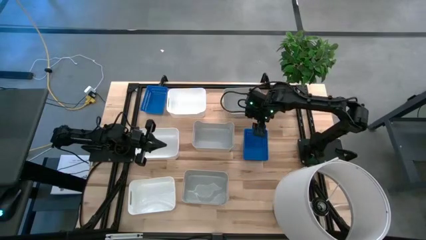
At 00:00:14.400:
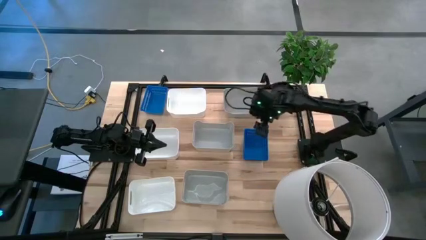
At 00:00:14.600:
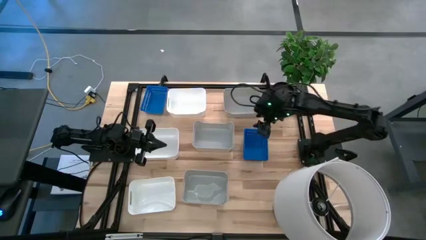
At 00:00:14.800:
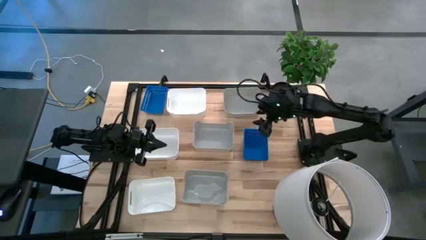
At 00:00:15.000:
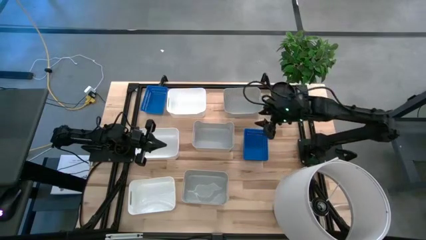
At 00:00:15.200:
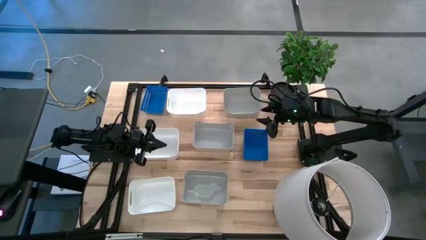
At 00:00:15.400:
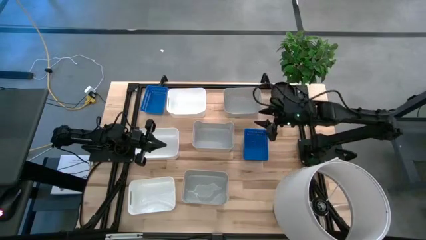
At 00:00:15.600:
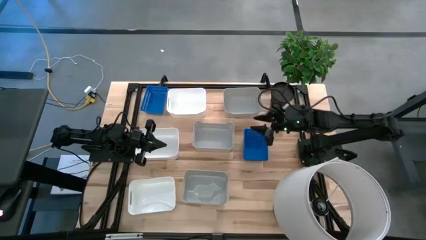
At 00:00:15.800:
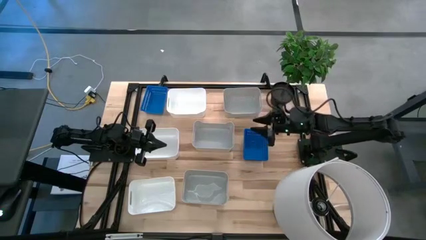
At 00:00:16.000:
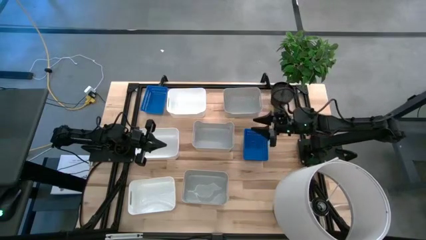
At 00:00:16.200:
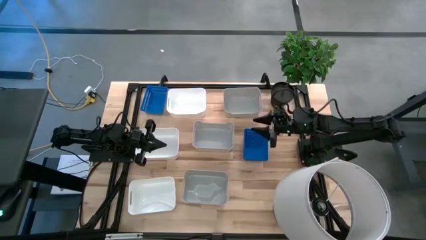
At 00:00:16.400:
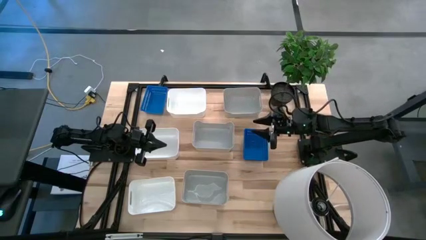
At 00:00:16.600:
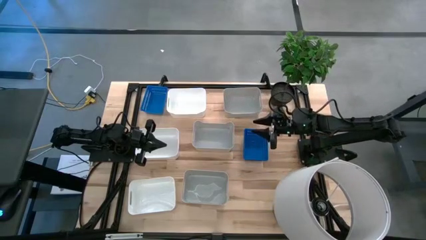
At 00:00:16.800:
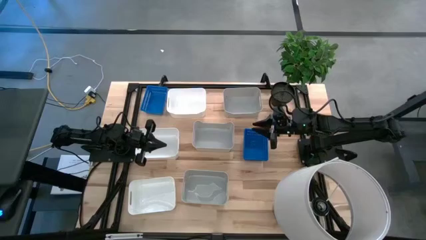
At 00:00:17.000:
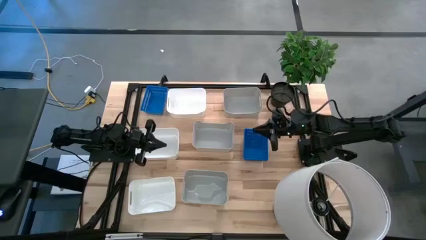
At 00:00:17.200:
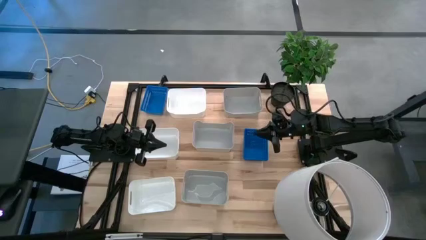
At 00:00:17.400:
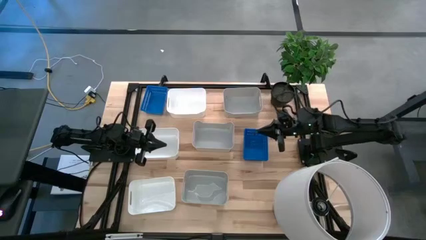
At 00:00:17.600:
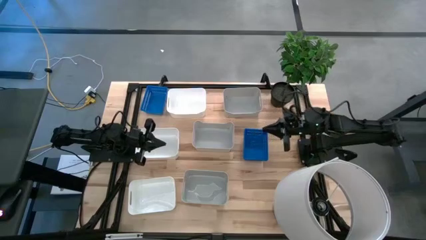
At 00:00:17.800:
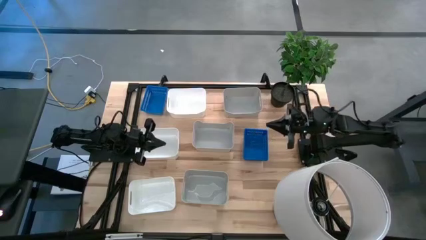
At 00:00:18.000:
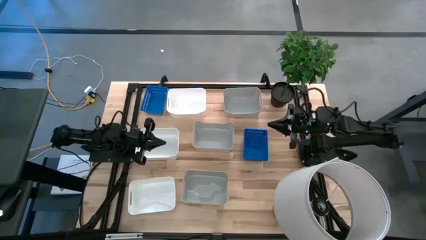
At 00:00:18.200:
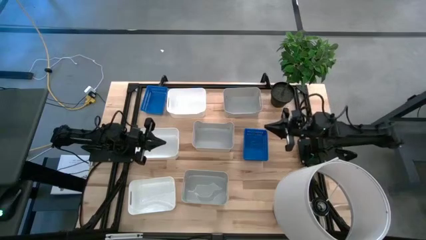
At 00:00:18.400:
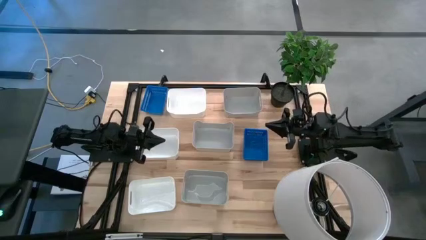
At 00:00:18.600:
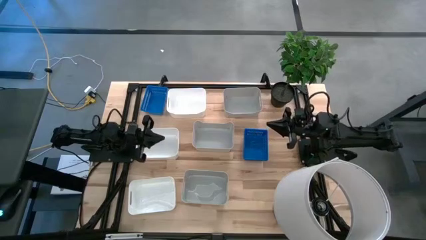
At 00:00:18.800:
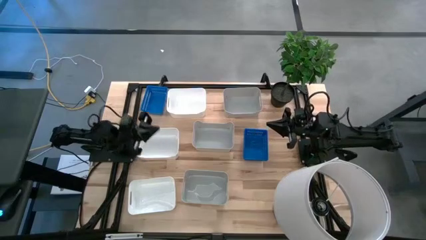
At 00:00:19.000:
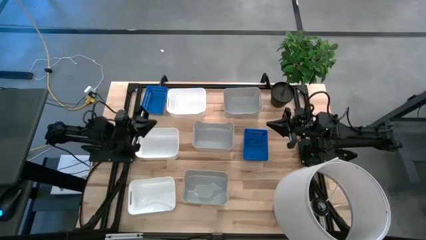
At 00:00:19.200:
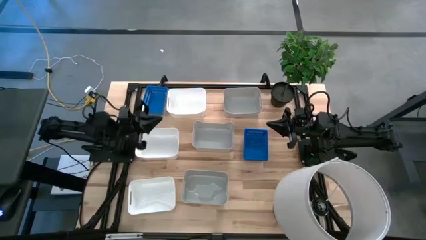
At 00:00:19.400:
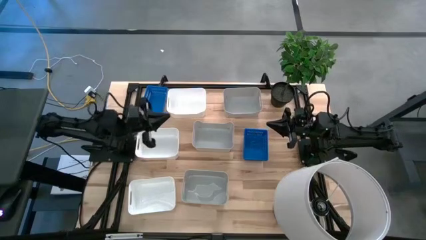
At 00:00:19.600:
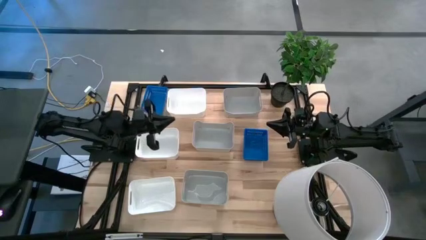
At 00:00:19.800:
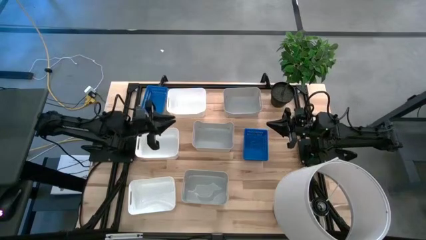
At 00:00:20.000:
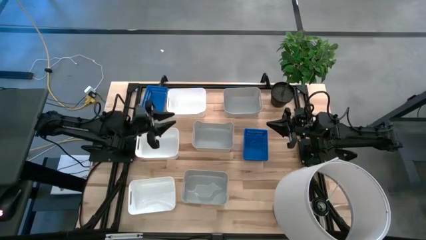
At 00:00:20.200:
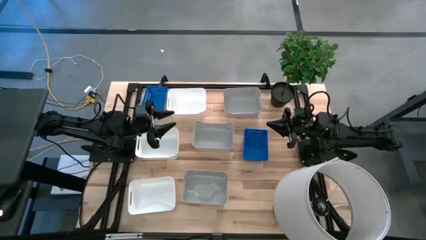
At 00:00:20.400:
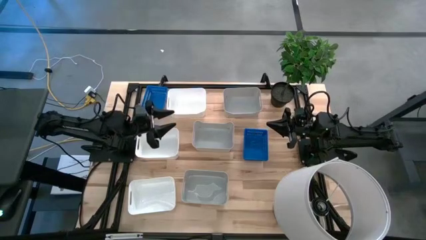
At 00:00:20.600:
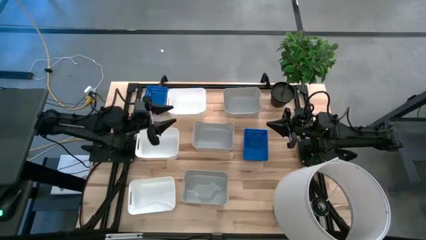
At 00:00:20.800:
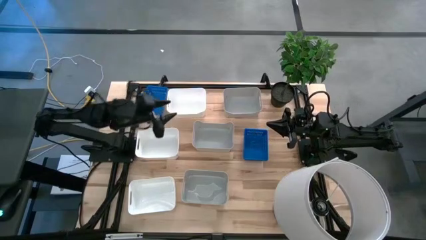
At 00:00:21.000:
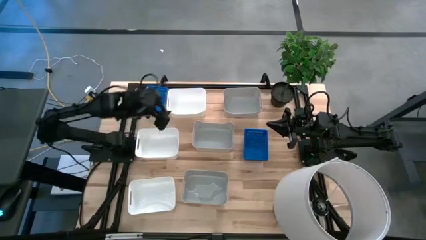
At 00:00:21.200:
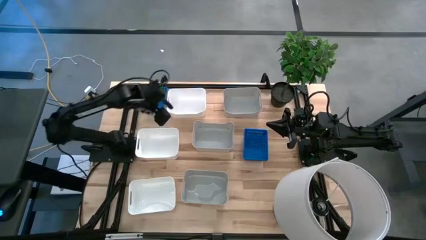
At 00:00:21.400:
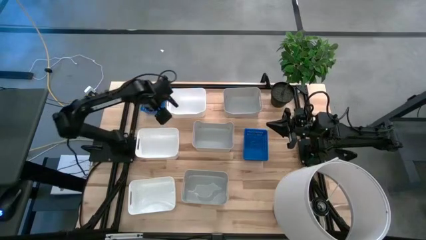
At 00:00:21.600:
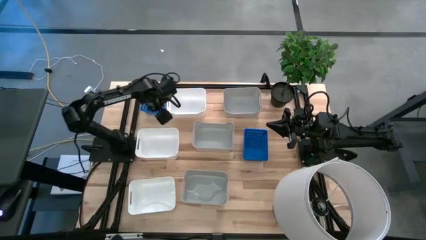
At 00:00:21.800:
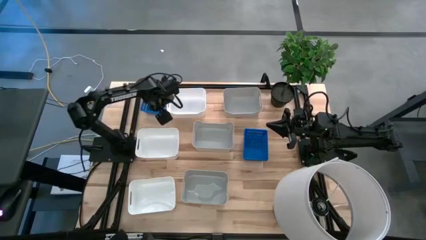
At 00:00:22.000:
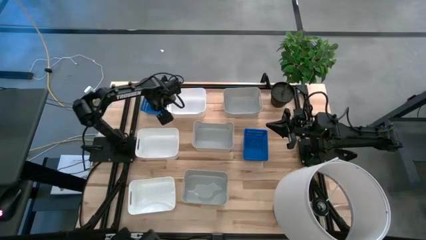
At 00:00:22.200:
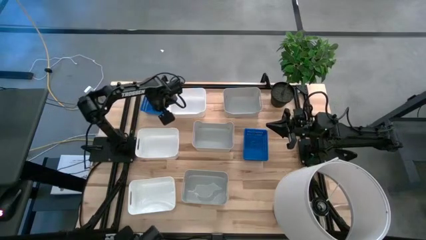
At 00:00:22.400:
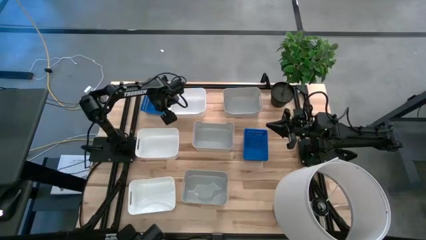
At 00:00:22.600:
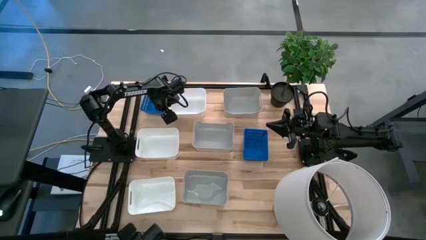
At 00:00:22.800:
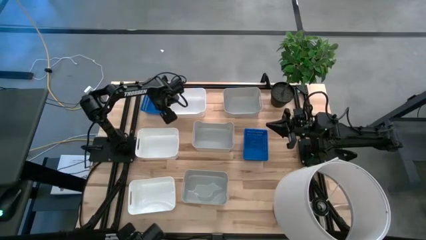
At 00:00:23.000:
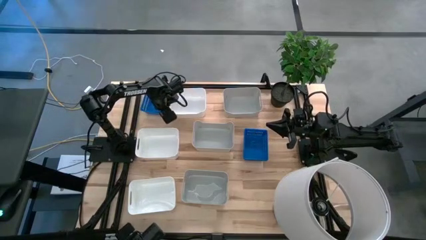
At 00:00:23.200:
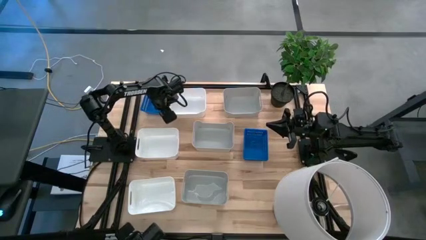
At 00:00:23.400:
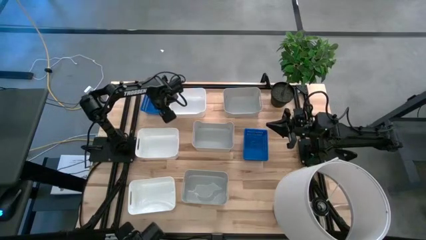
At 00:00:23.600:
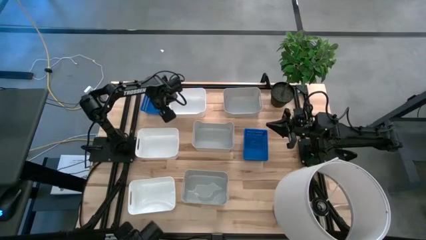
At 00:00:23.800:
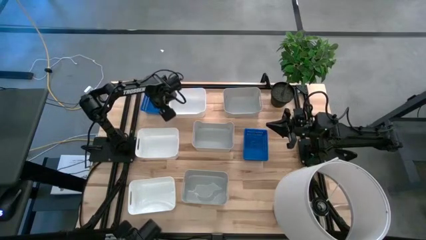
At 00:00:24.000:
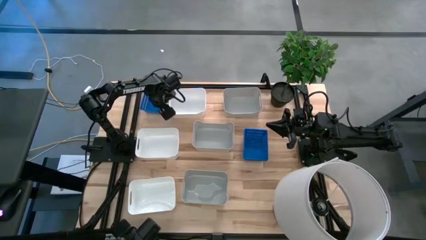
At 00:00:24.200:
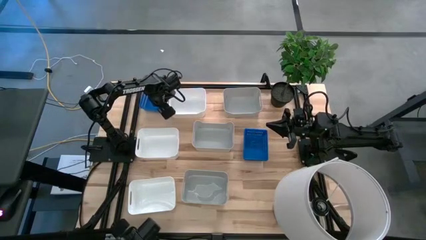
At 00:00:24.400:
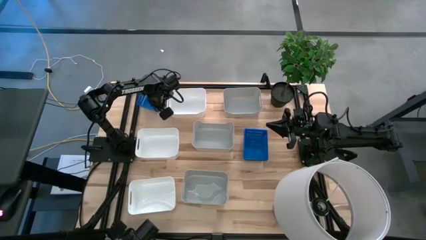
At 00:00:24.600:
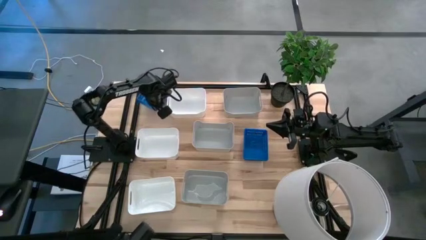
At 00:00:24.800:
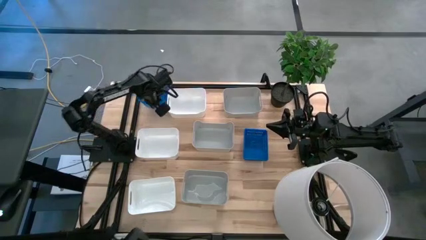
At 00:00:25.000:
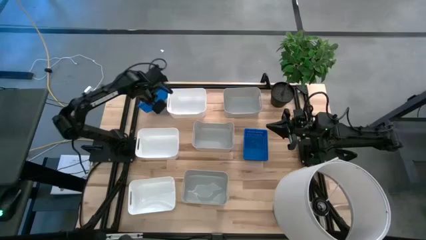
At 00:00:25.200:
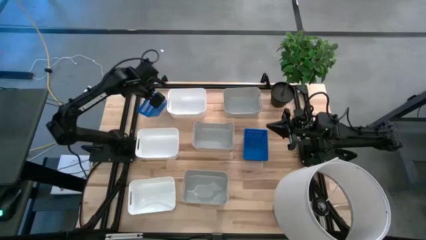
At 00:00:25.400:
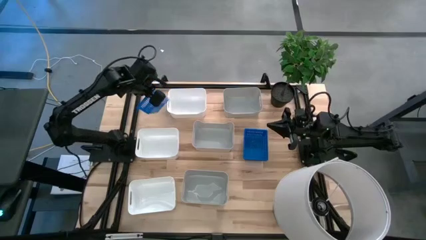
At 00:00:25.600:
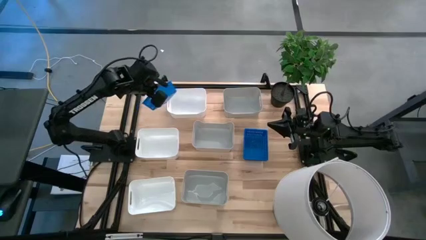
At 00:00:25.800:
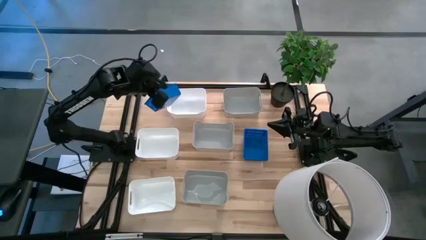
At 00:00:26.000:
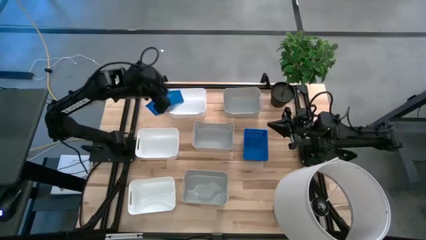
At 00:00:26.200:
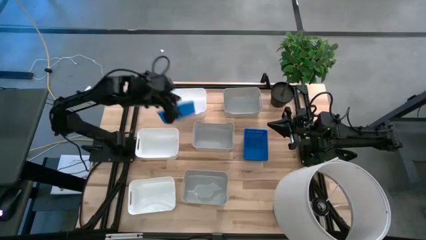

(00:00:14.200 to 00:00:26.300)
Stack the blue bin into the middle right blue basket

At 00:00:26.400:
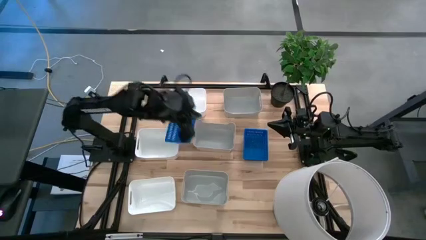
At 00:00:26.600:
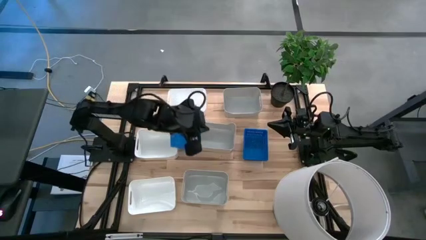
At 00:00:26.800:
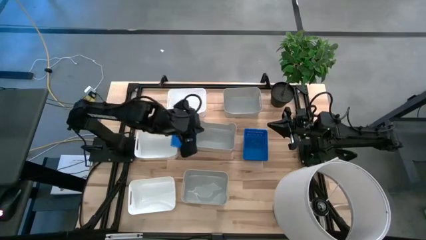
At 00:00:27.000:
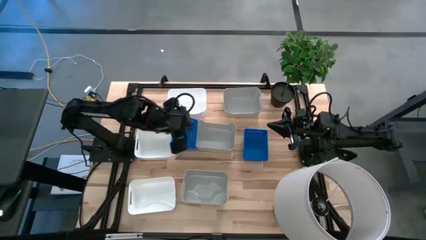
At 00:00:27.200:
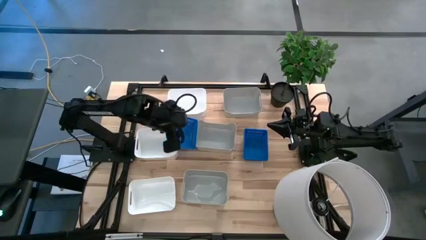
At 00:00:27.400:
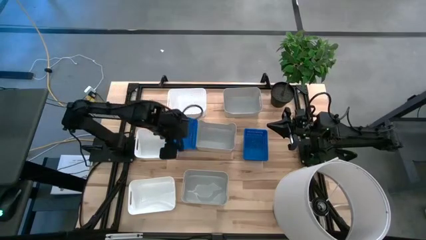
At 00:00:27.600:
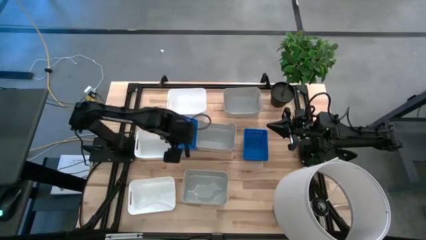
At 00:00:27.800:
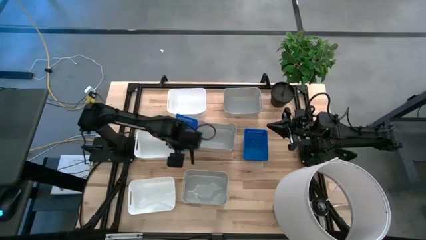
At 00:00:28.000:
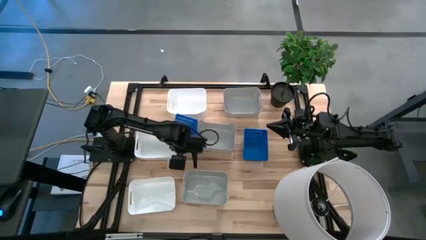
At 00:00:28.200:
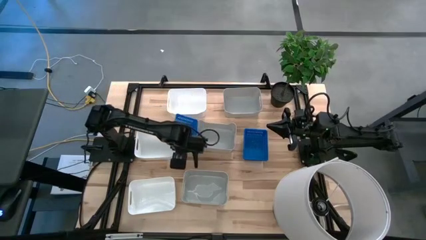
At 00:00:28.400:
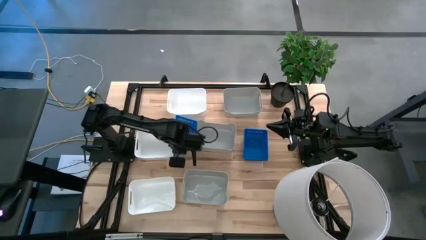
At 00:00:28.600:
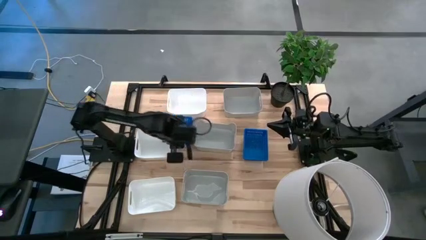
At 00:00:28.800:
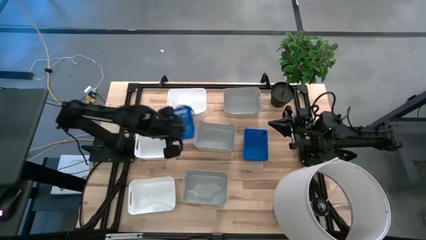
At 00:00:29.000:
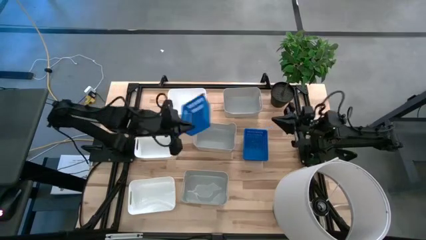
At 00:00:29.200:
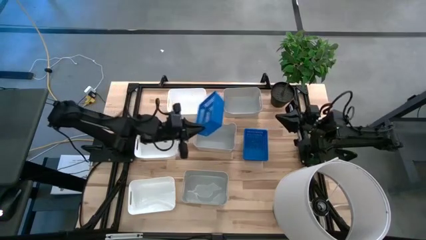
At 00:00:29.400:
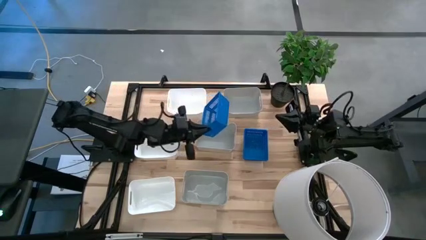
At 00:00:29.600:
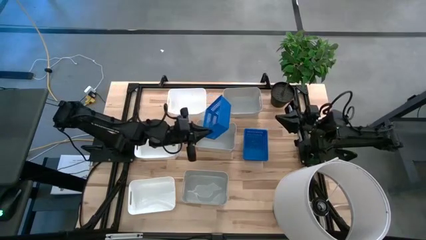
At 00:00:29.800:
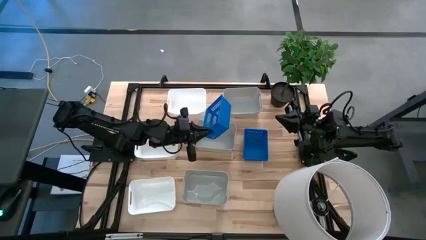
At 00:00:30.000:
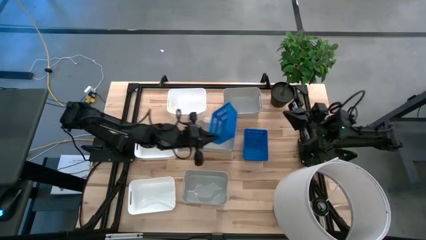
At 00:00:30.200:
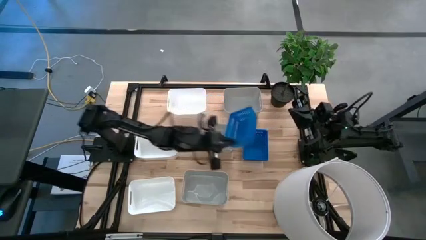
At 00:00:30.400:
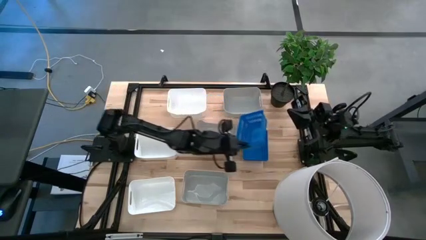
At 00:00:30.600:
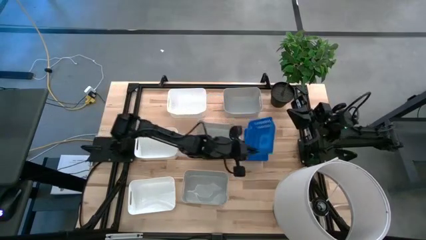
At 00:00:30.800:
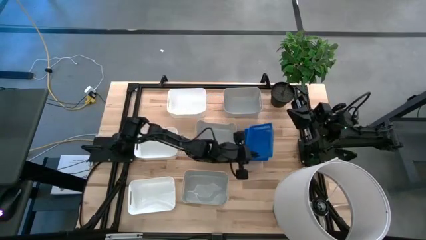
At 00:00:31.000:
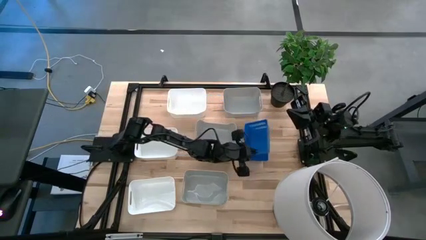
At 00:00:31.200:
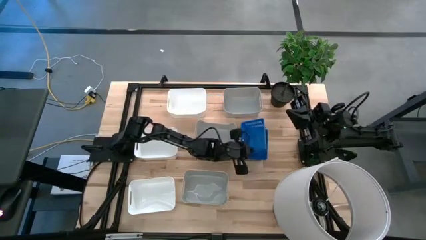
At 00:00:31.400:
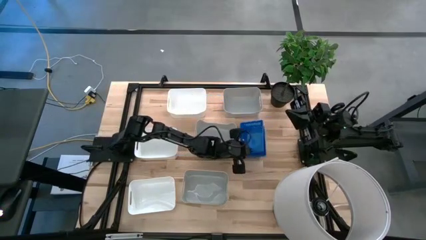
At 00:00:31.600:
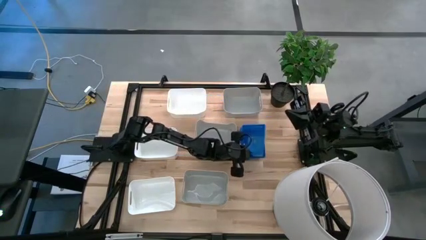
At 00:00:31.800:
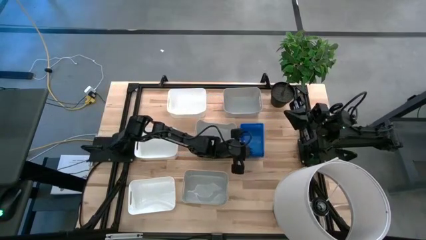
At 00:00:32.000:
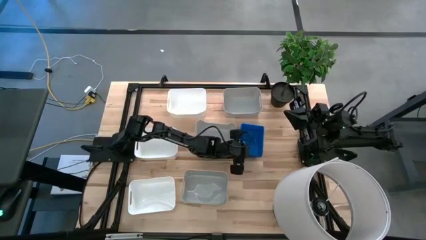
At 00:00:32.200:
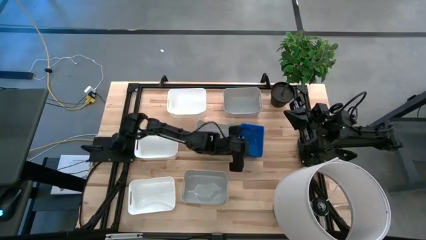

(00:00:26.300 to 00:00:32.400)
Stack the blue bin into the middle right blue basket
